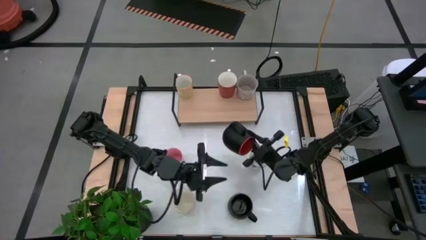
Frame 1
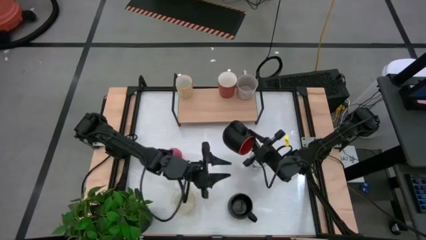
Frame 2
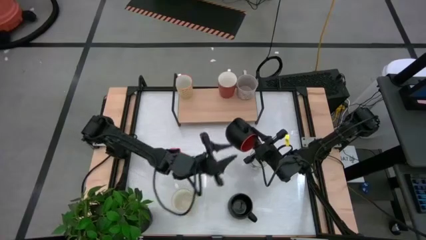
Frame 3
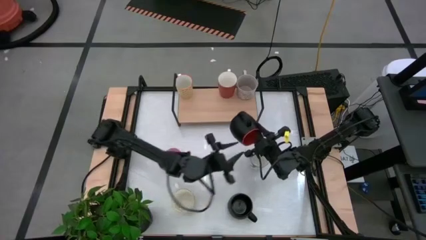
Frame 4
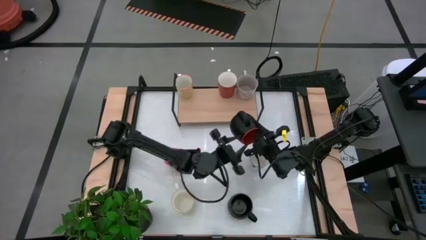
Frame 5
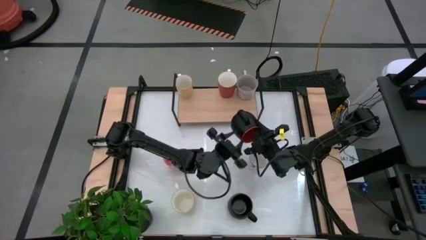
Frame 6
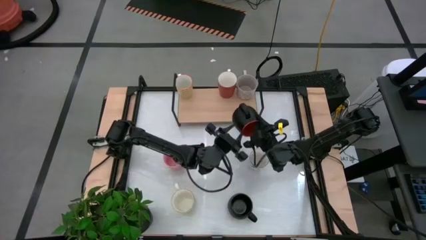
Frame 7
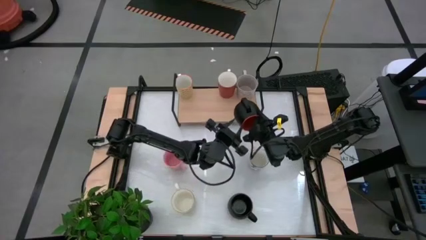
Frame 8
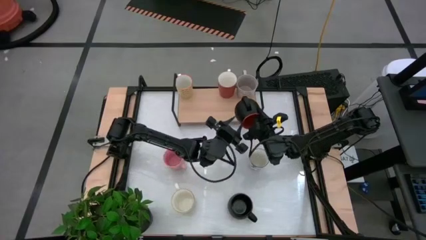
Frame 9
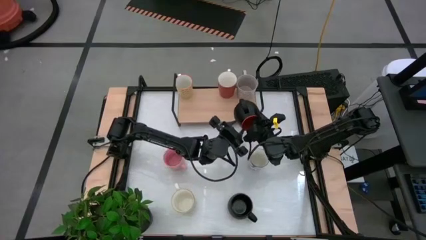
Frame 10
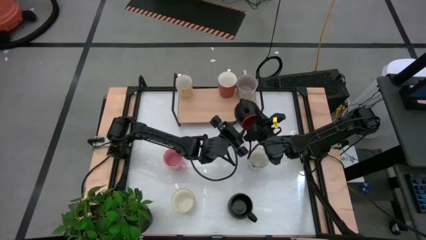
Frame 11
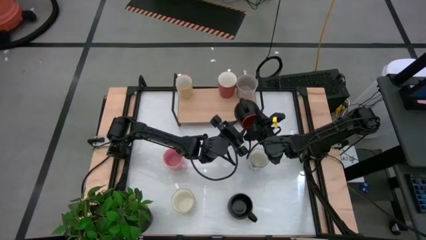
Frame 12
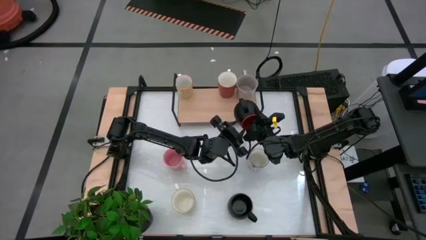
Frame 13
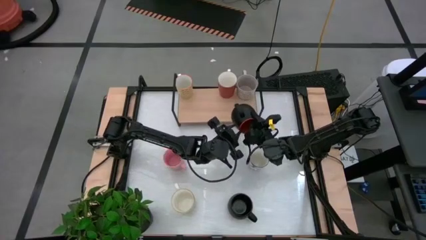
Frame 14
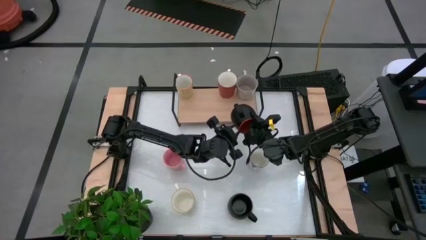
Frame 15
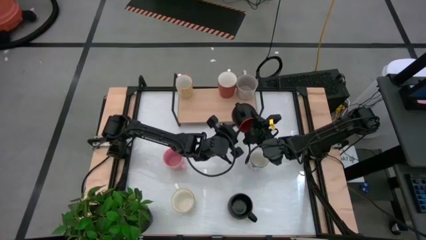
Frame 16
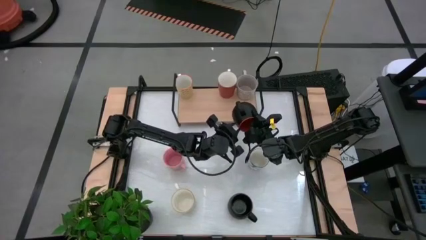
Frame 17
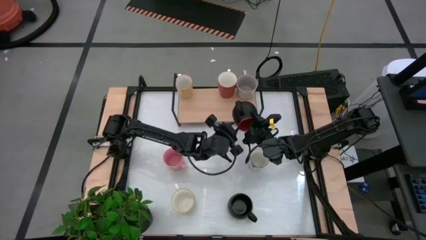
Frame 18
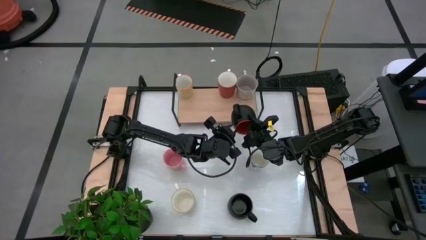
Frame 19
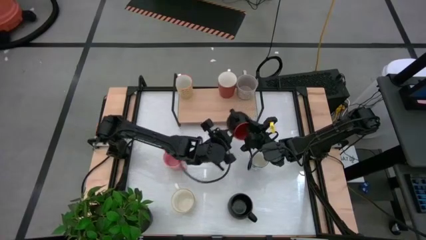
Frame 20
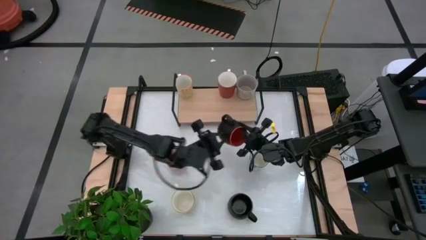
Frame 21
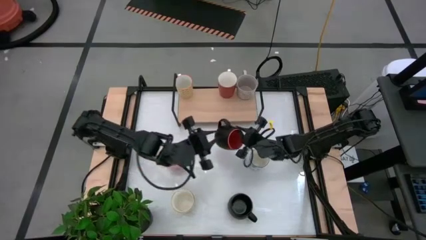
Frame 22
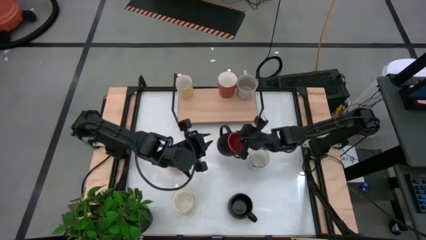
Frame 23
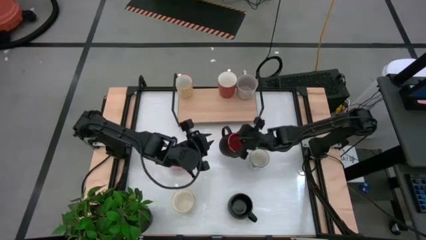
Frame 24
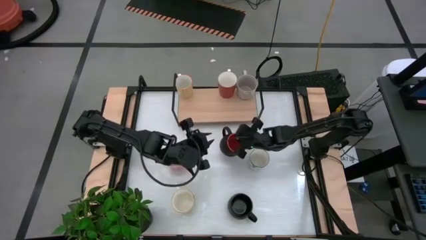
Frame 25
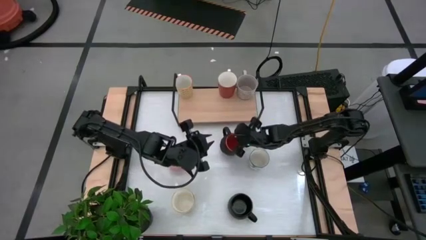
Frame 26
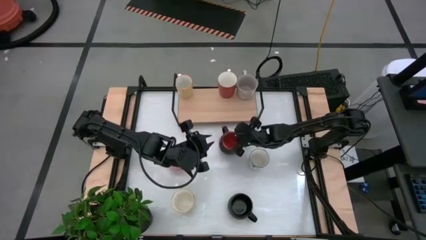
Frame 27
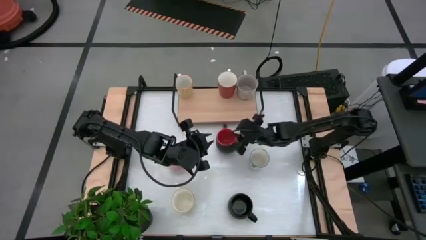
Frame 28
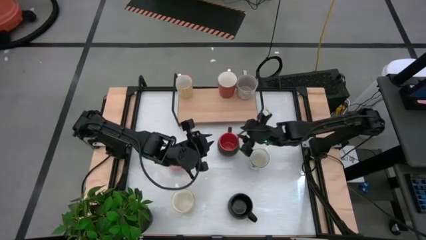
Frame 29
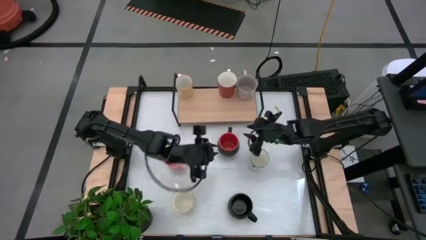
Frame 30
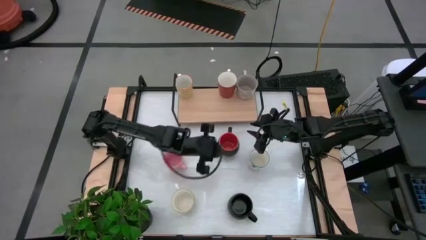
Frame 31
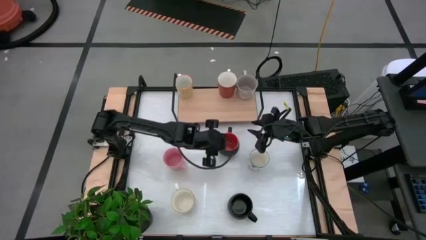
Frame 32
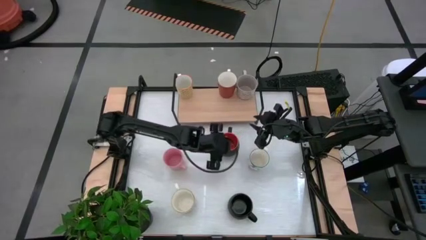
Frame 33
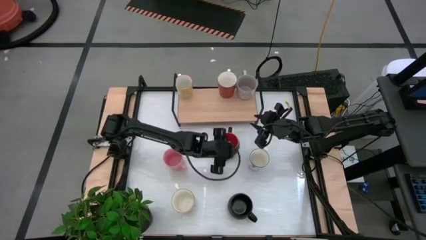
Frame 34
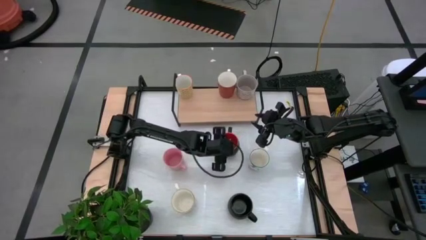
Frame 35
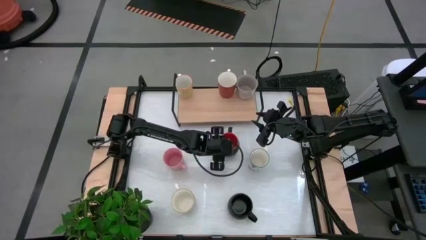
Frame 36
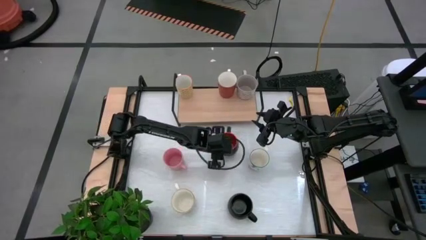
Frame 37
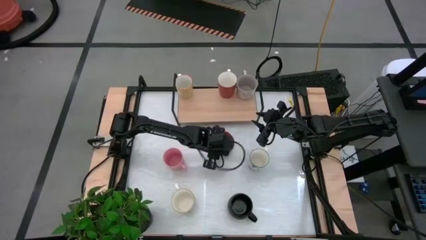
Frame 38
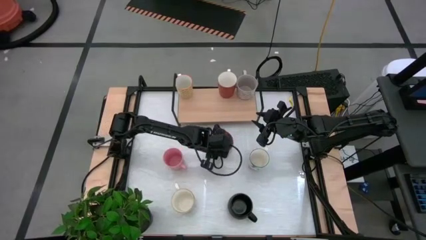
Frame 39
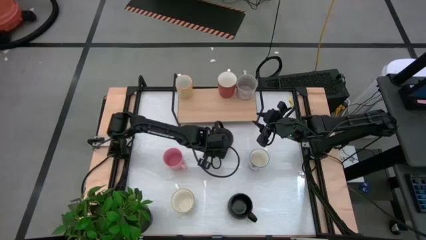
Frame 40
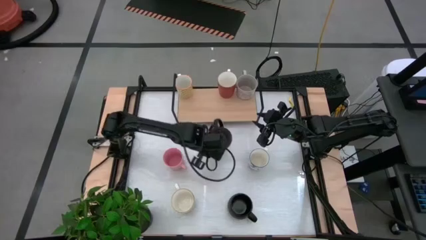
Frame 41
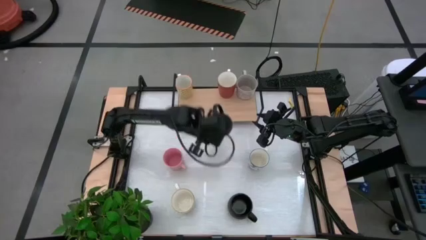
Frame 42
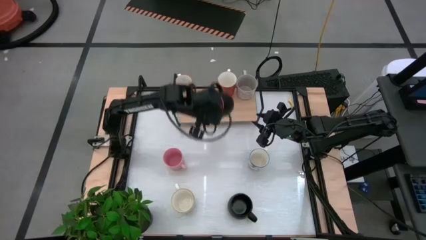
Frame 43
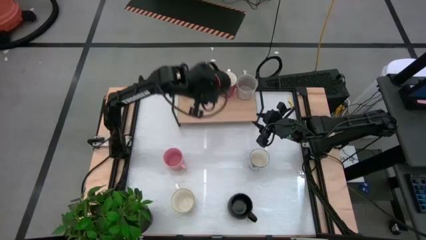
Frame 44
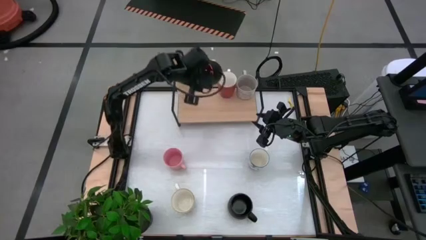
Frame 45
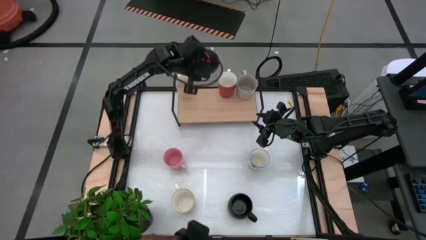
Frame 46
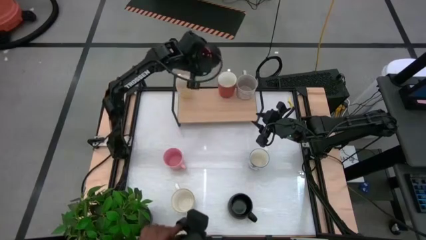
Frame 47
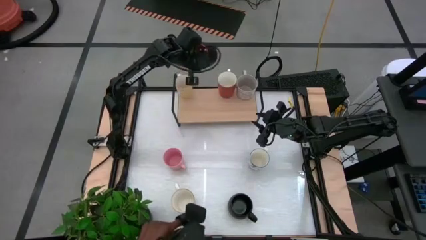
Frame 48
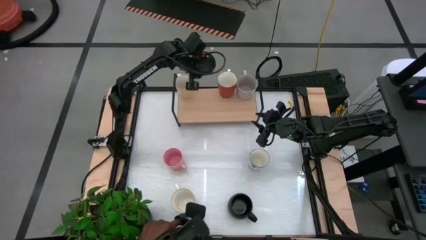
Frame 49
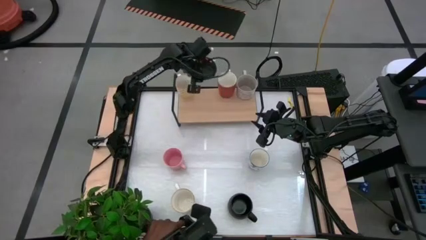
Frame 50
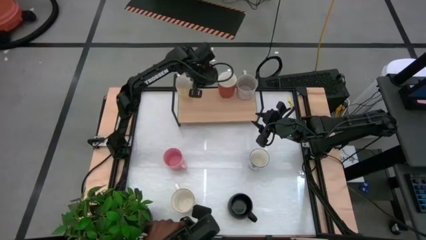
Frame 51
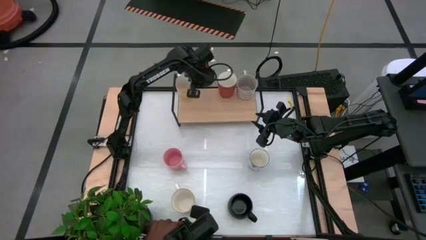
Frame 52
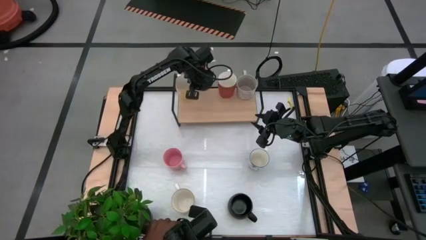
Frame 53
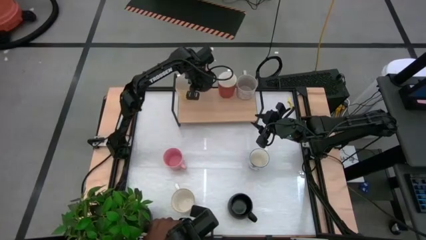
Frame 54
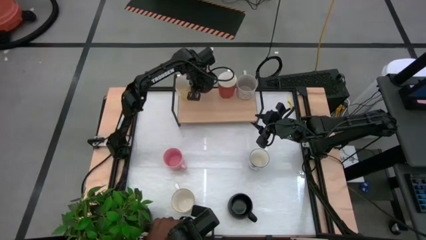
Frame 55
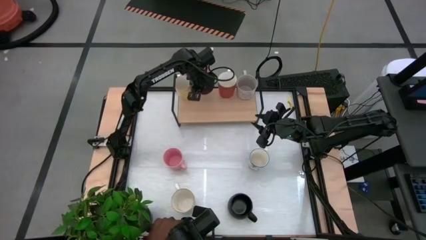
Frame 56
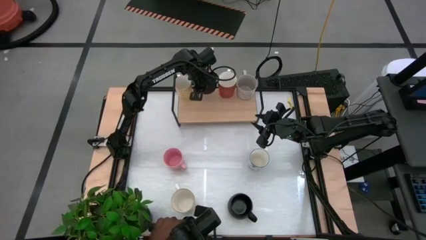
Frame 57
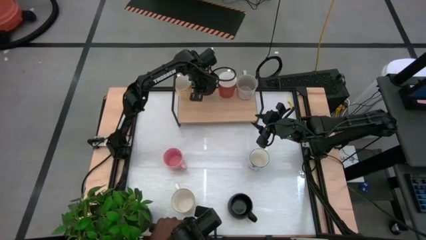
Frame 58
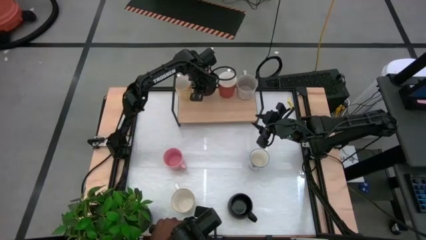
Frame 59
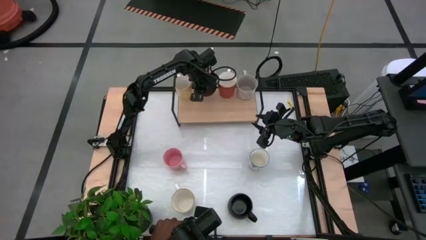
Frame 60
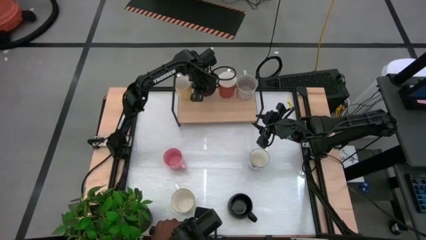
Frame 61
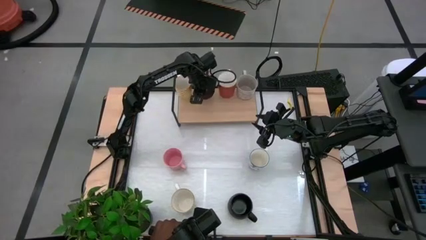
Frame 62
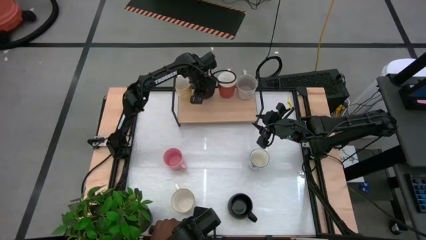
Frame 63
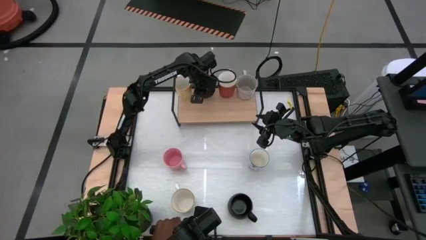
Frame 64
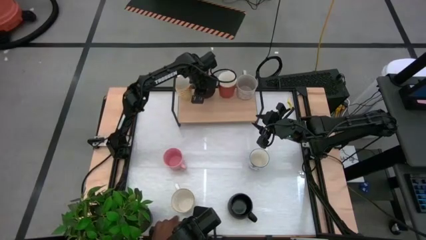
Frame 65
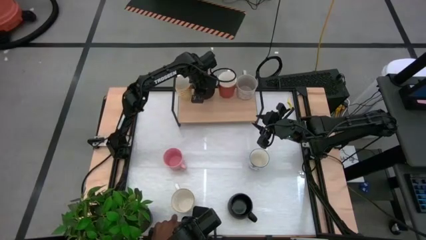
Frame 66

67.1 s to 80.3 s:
Task: Place coffee mugs
Put the orange mug on the shelf

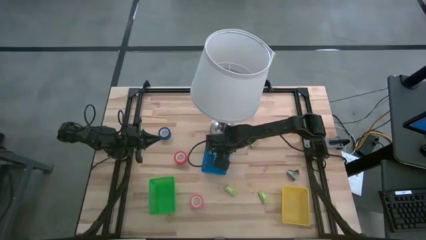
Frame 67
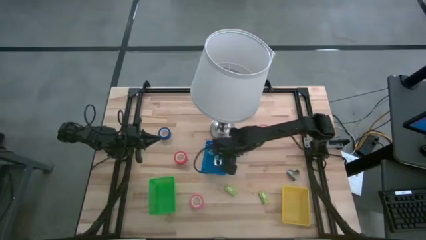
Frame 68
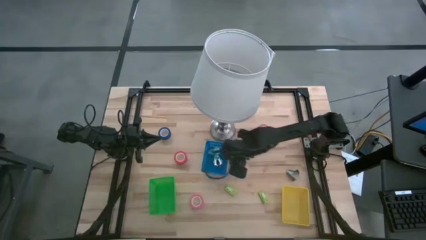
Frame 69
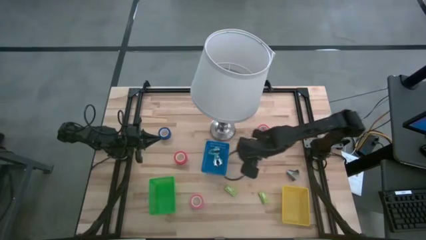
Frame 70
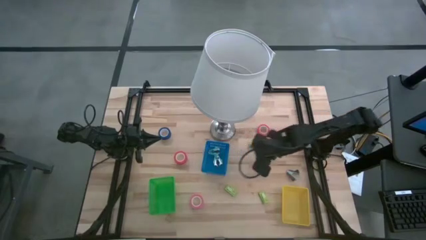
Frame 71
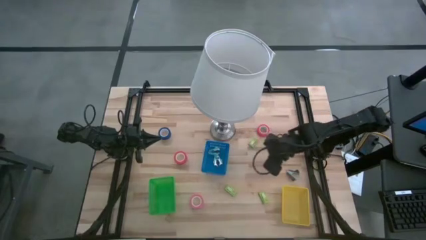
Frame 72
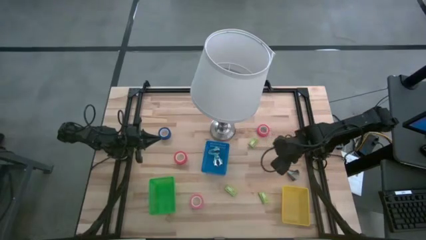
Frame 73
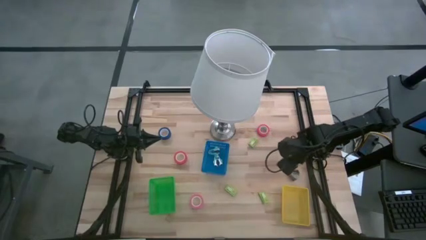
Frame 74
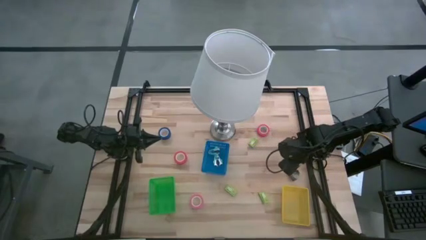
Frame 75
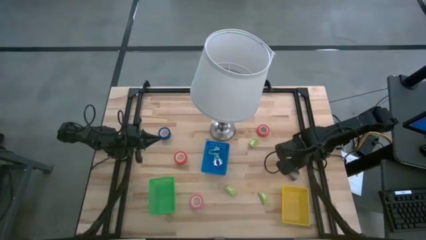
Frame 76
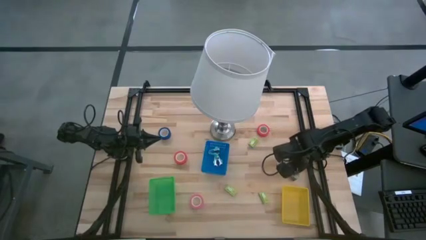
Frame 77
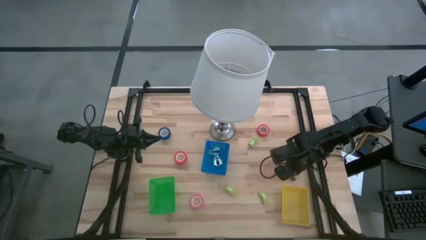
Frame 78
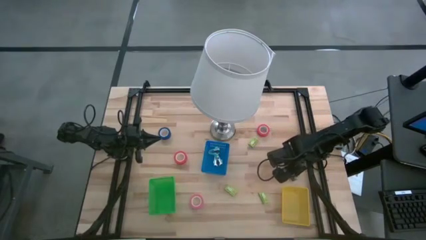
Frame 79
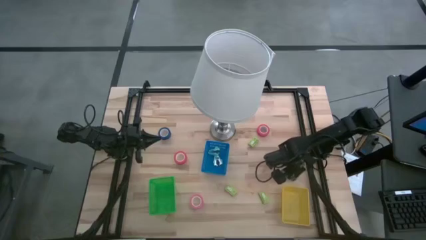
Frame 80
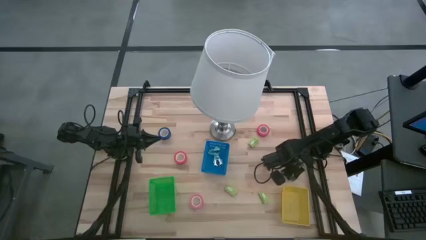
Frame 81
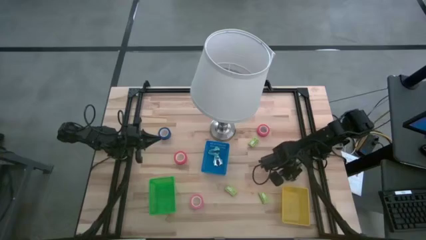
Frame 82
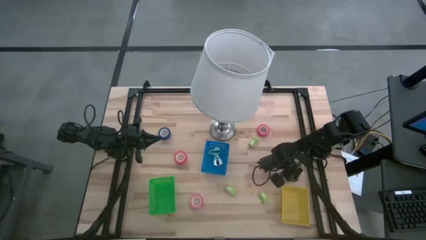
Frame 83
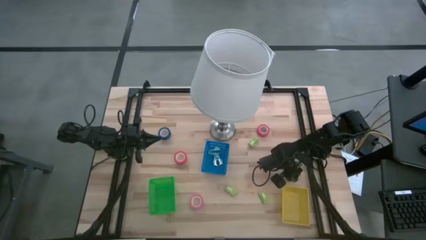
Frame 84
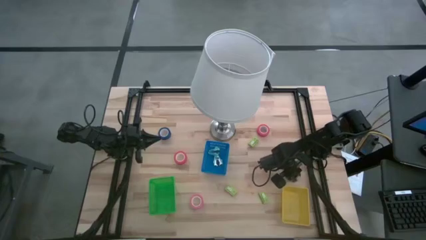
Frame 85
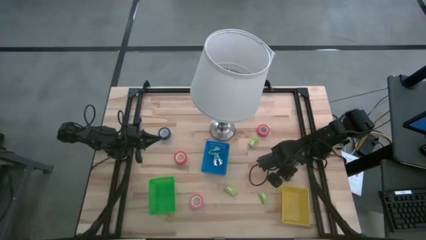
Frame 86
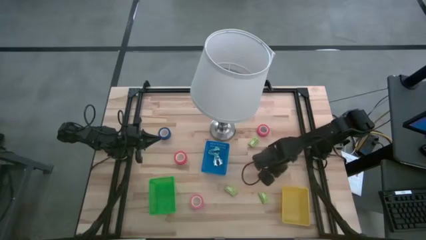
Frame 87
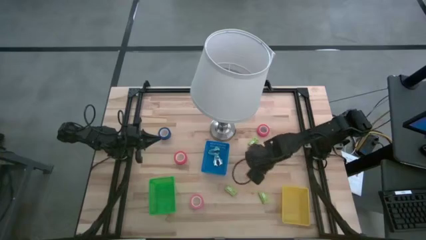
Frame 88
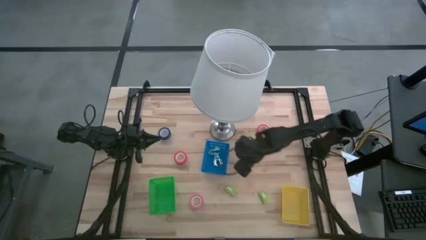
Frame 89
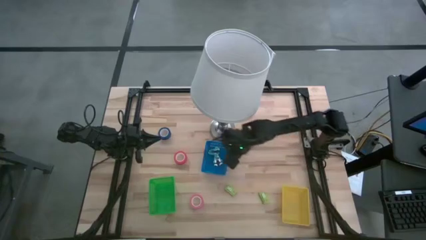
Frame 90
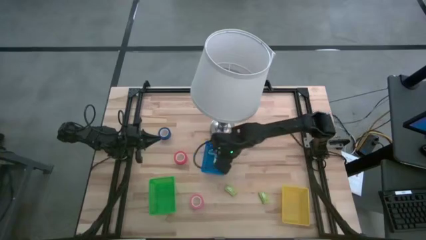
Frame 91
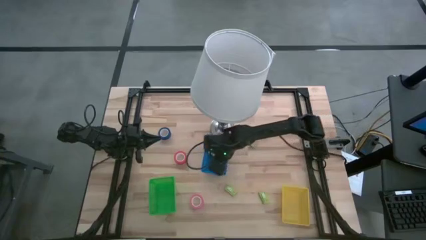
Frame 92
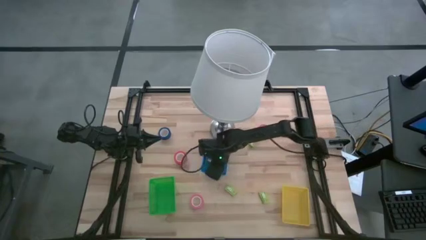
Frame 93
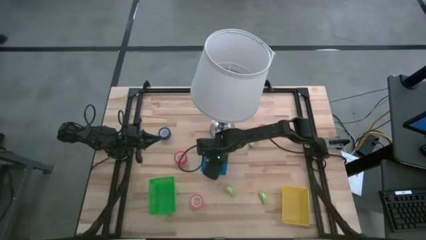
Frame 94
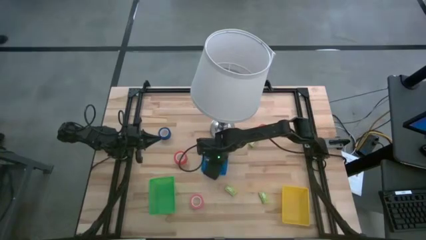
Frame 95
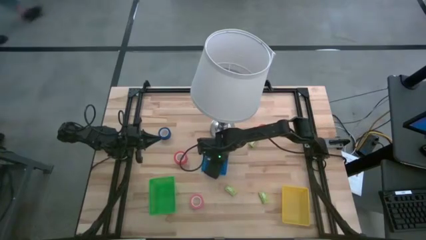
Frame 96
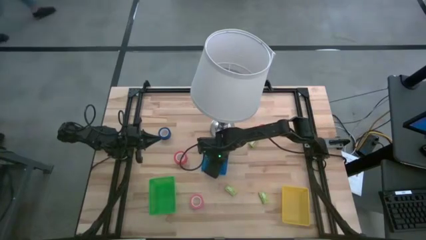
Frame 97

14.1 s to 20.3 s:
Task: Pick and place Stapler, Stapler remover, tape
Put the black staple remover into the blue bin
